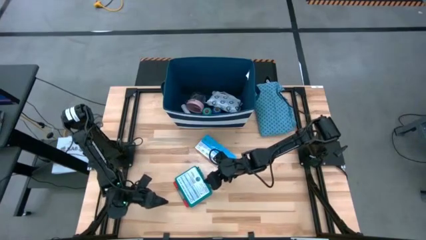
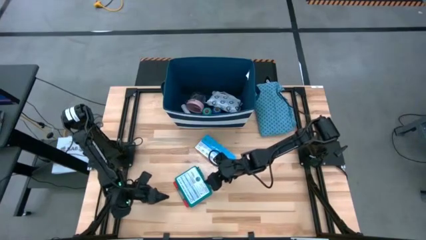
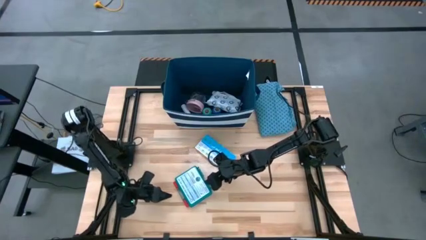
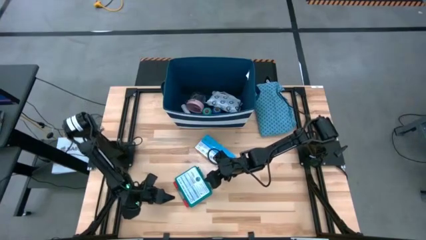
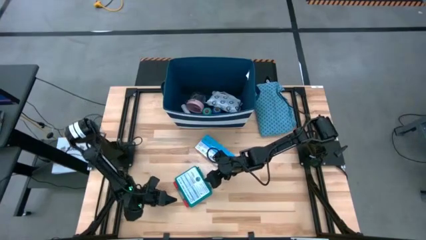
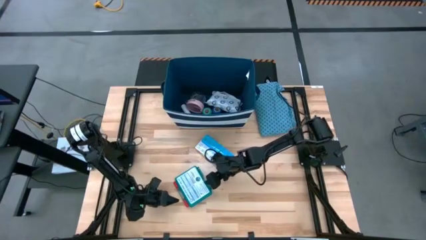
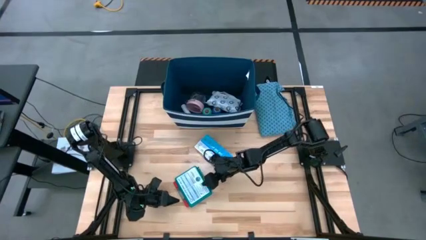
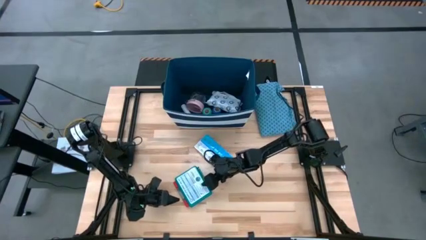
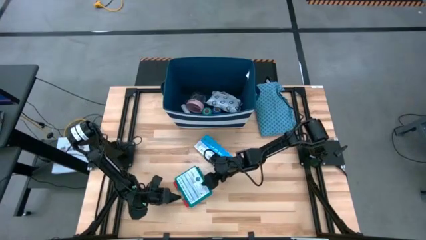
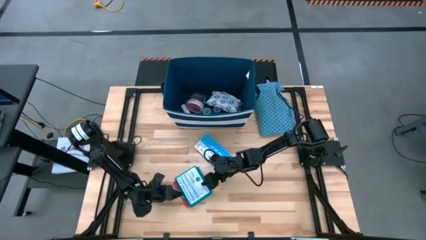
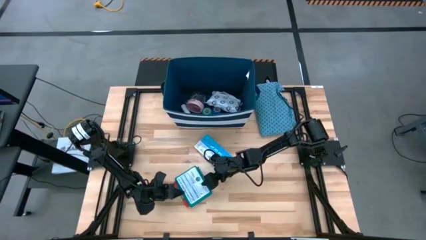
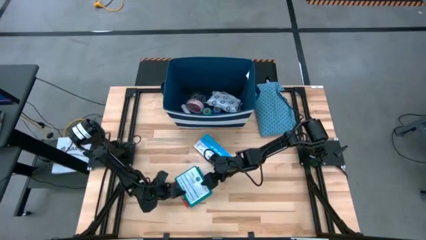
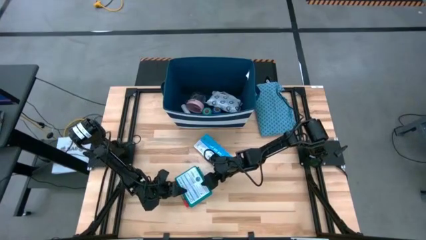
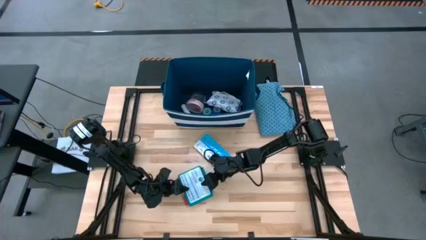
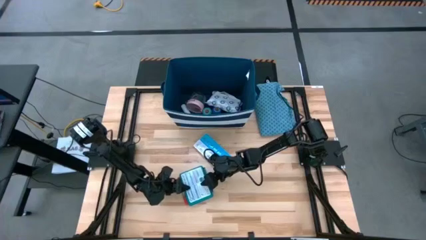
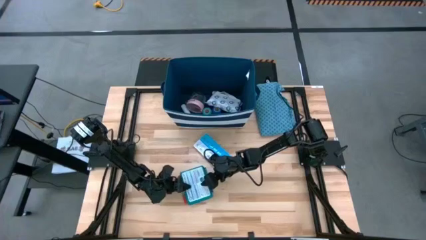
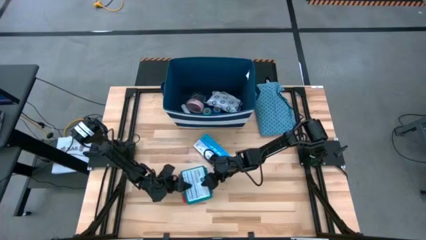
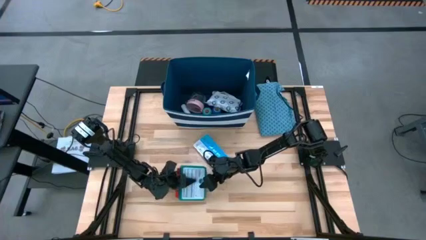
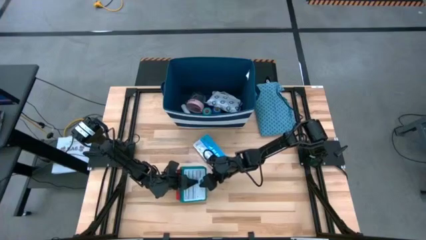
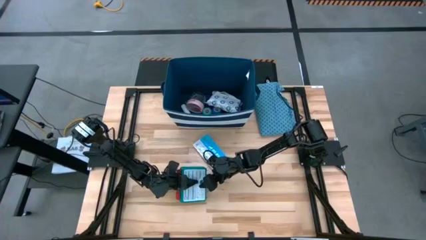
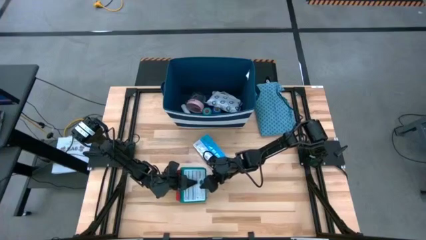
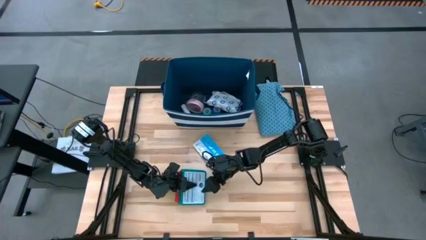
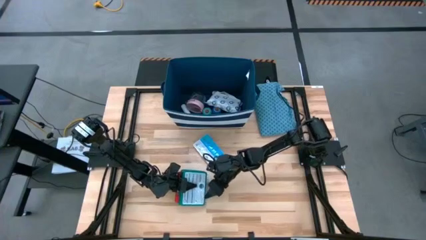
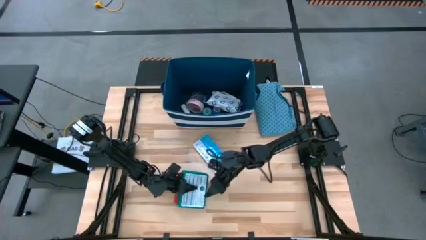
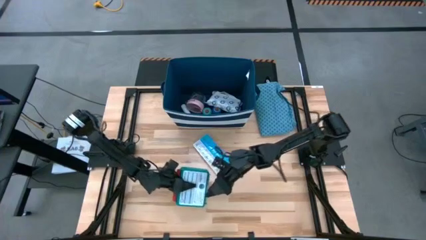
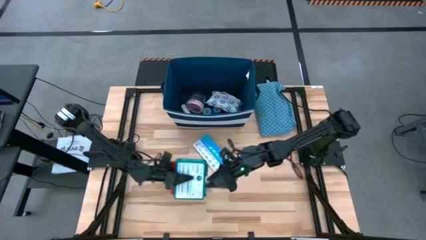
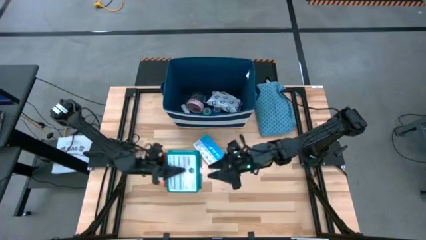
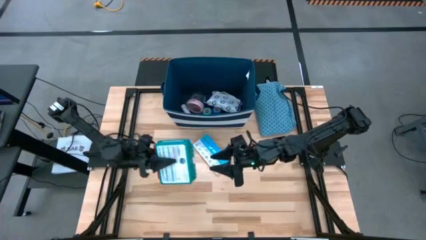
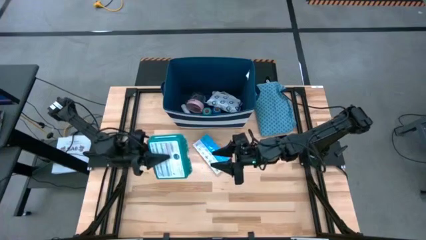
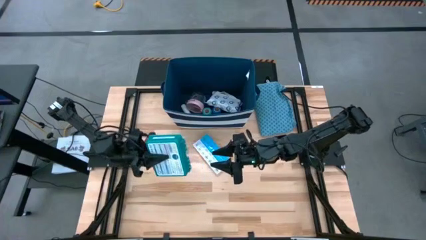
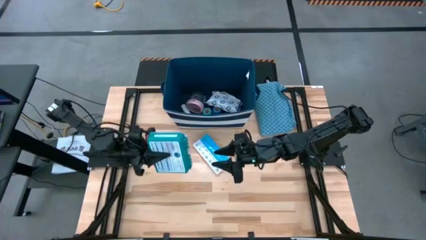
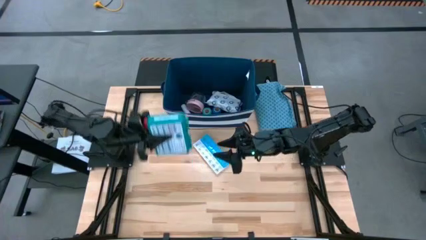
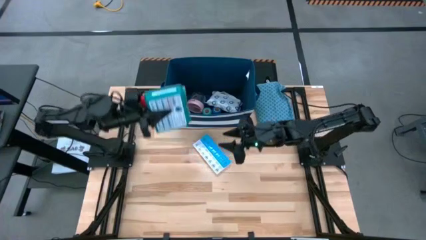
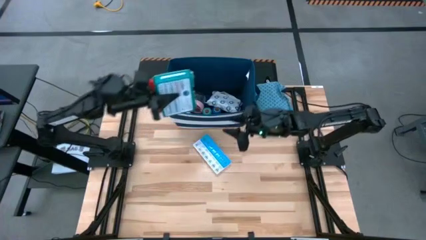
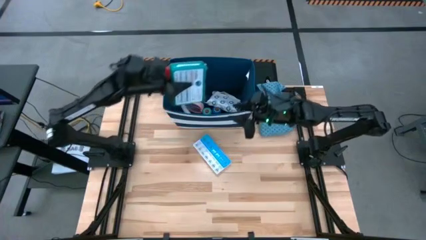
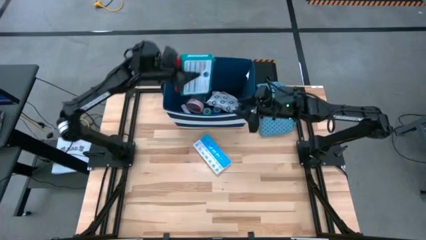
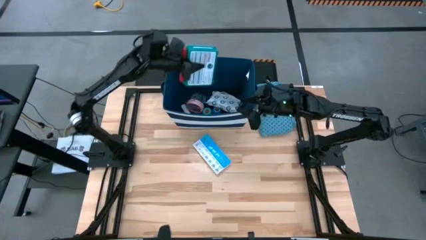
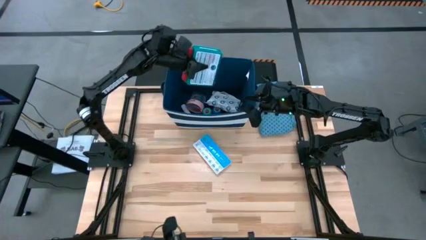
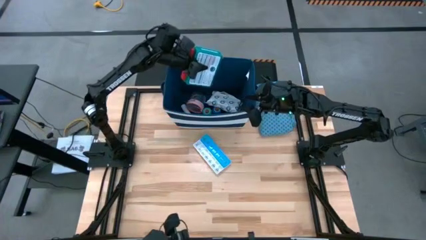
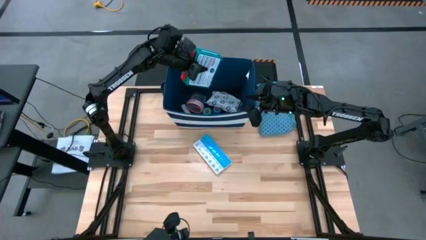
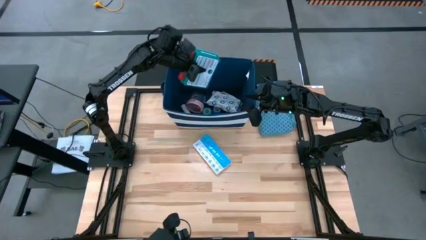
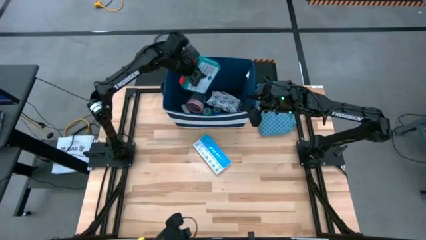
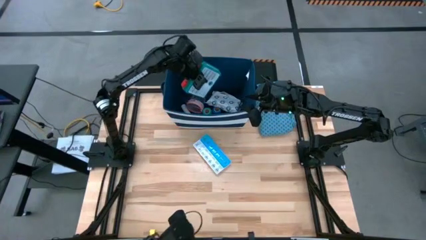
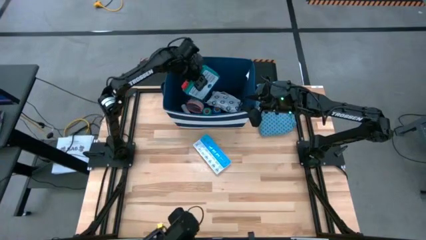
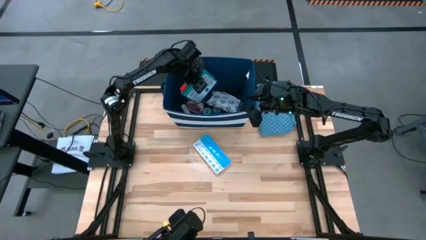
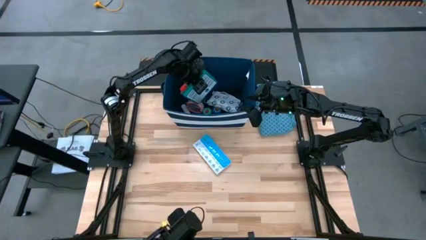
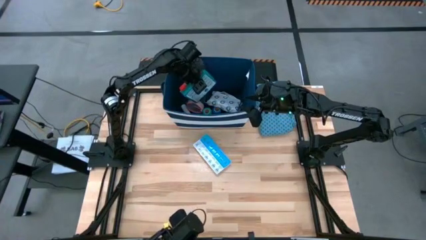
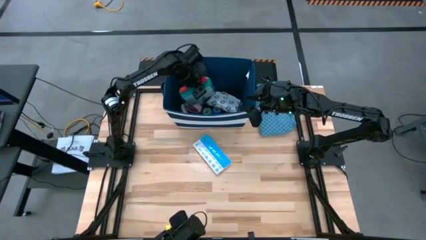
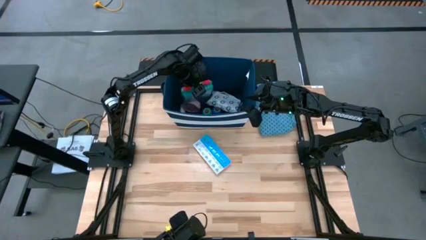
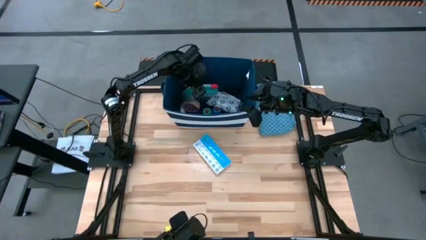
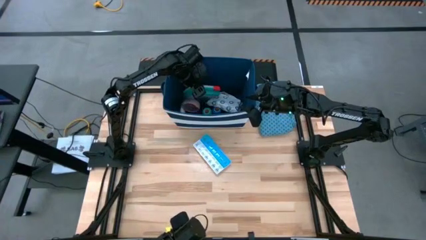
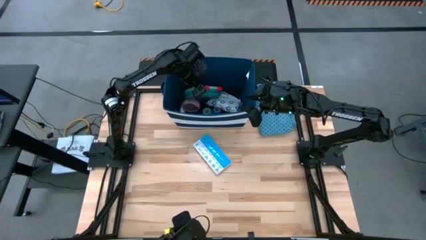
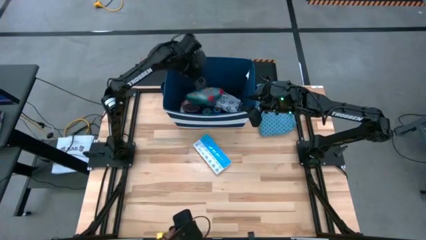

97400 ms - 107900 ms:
Task: Pick & place medical supplies in basket/bin
Put the green emergency kit into the bin
